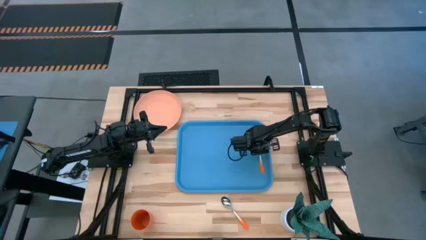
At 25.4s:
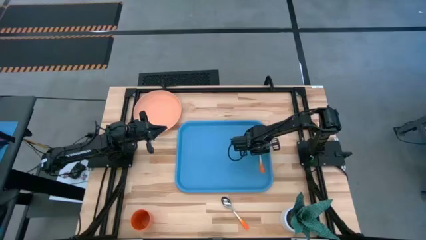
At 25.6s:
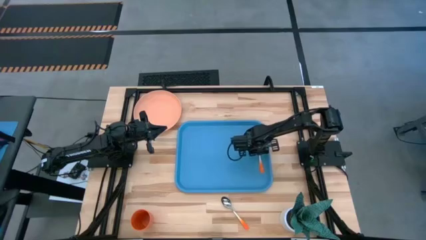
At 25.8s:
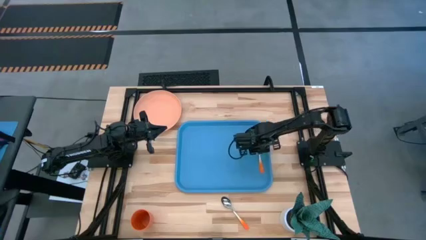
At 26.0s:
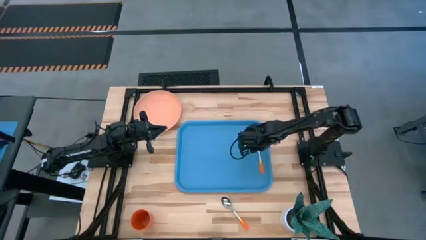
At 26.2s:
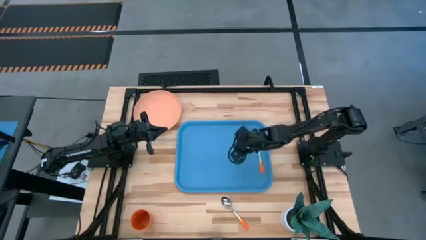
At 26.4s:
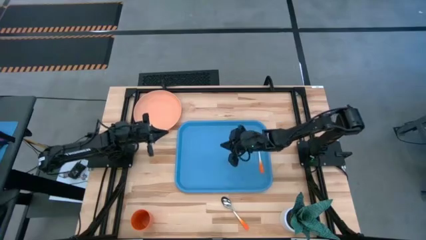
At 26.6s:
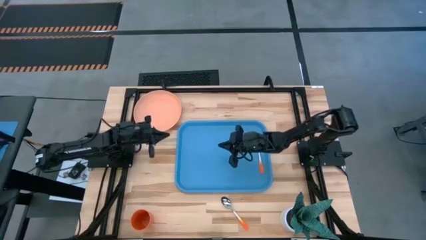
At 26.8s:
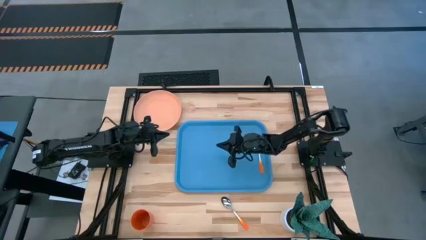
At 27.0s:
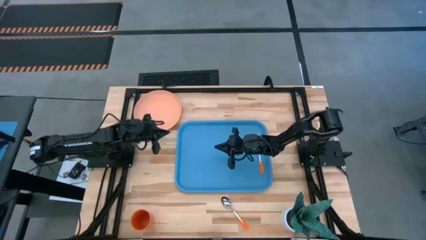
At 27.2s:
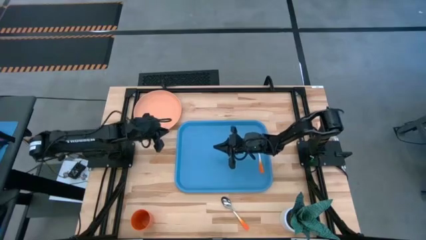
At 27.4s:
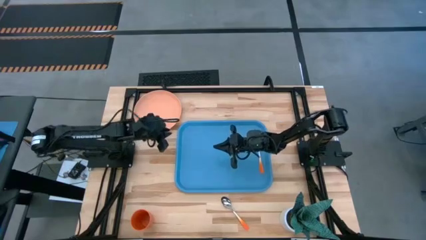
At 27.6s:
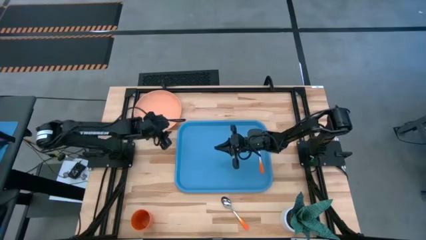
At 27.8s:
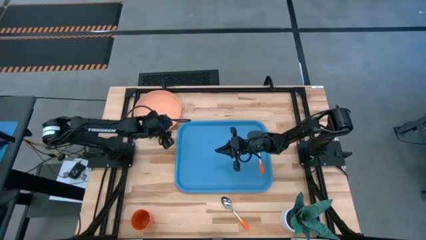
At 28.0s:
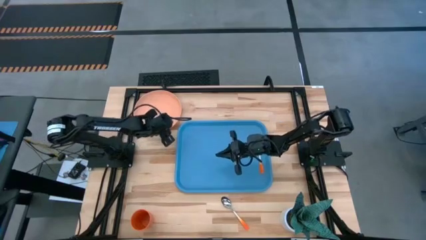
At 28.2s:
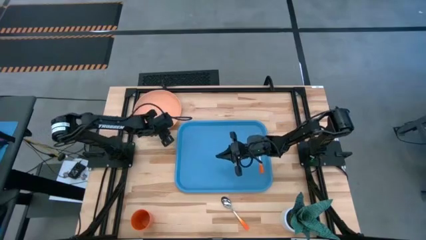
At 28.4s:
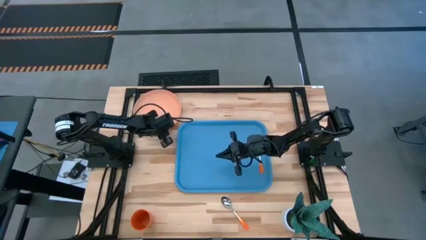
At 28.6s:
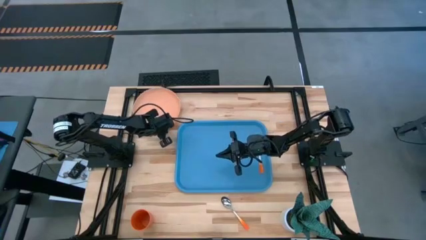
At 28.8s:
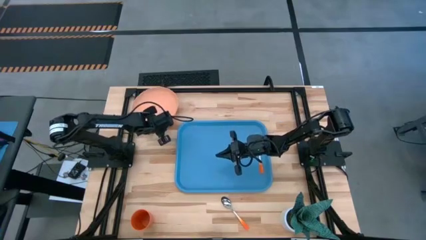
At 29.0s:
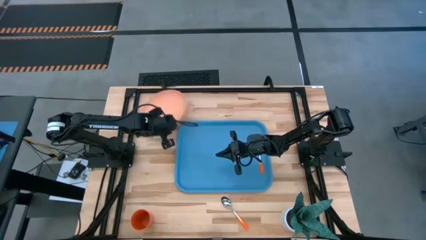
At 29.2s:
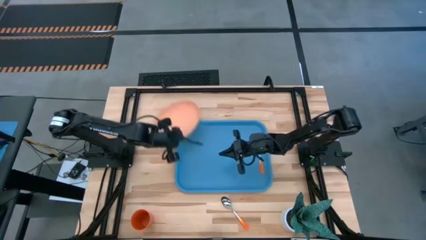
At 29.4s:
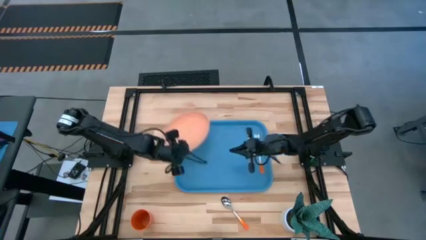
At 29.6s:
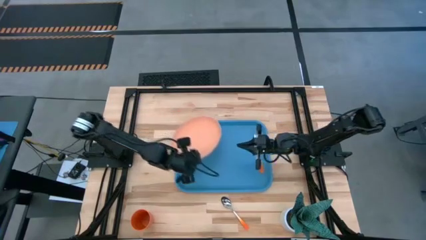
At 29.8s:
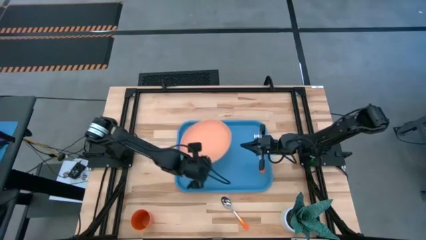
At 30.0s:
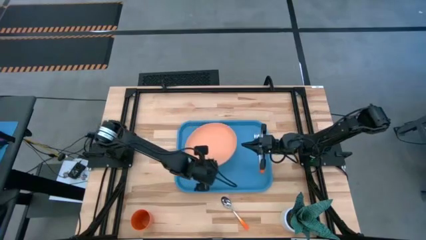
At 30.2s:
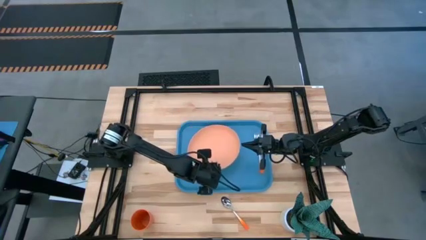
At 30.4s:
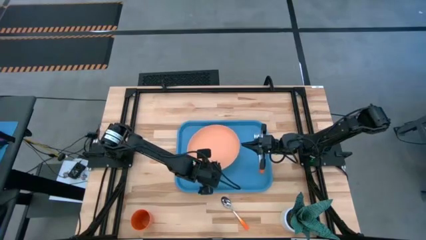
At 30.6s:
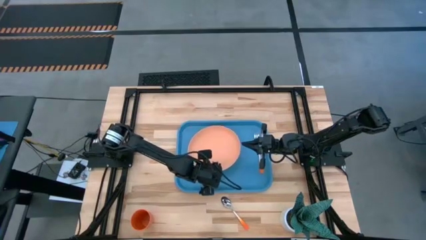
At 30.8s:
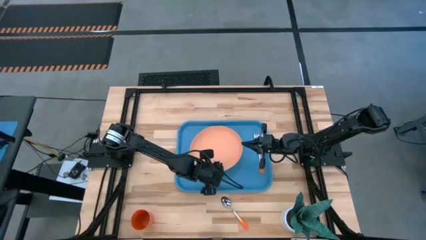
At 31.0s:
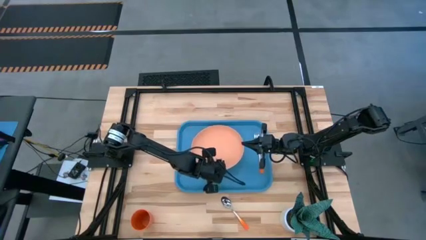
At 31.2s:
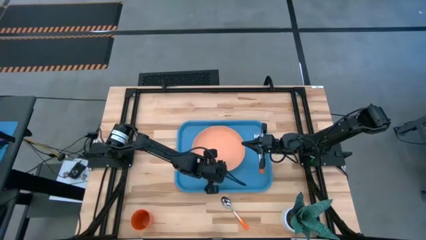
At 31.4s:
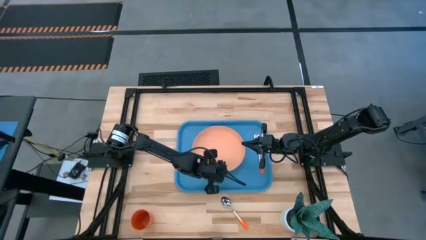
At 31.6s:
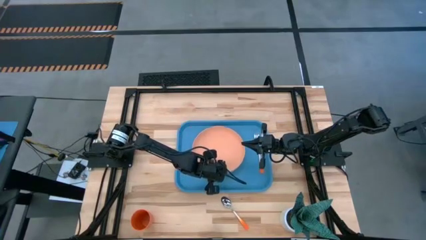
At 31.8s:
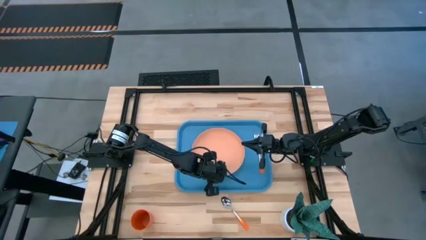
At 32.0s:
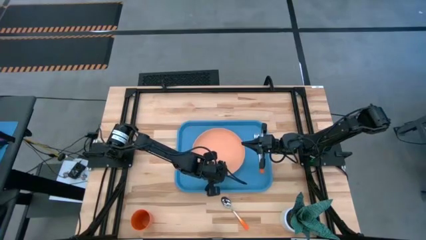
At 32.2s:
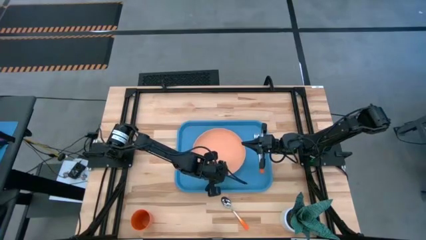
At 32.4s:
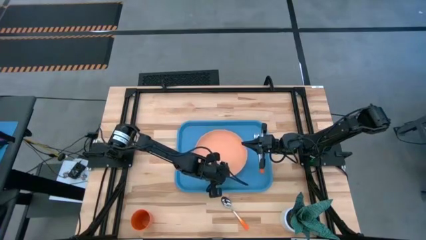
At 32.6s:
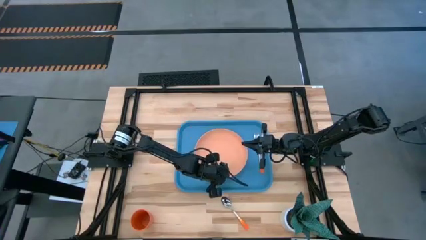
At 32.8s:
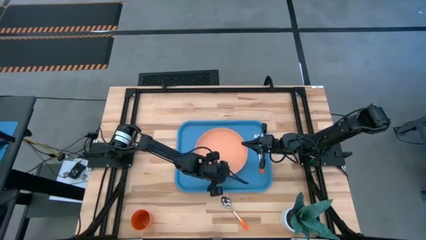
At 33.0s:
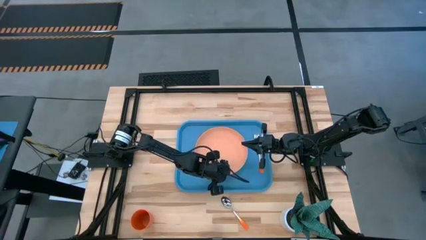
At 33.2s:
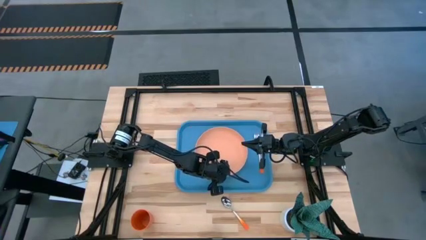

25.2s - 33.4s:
Task: Pick and place plate/cup/fork/spoon on tray
Put the light orange plate on the blue serving tray to the left of the orange fork

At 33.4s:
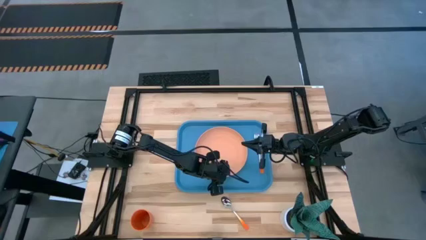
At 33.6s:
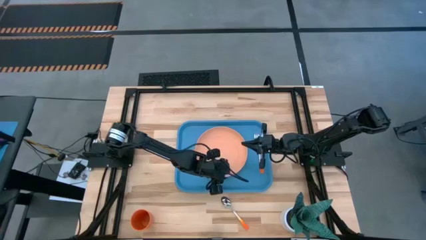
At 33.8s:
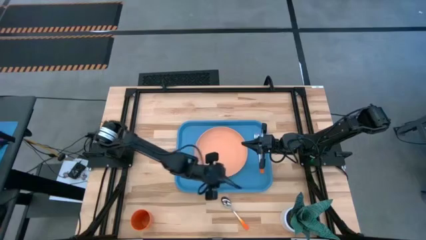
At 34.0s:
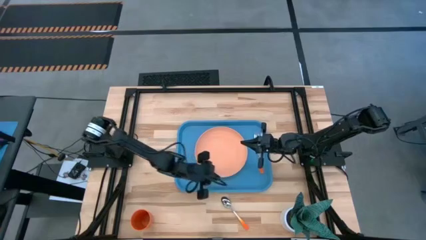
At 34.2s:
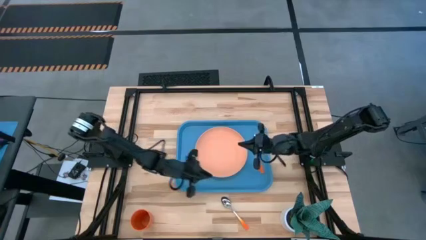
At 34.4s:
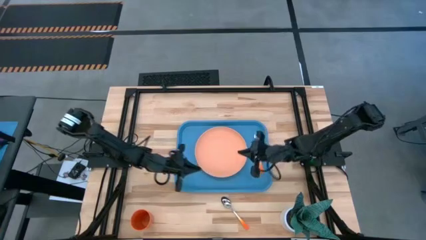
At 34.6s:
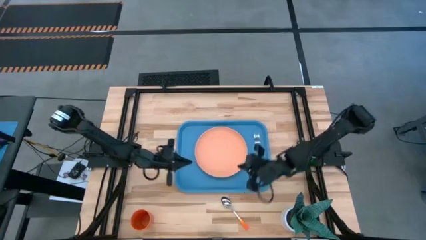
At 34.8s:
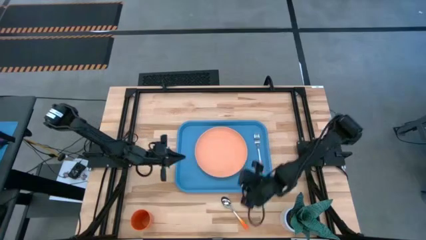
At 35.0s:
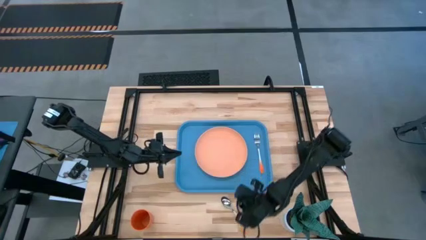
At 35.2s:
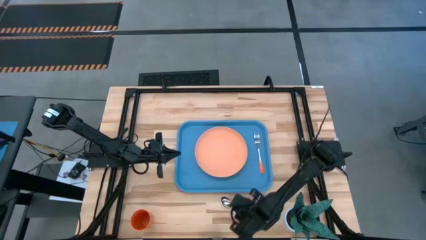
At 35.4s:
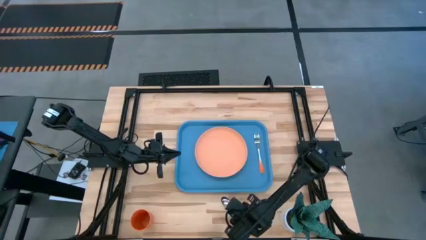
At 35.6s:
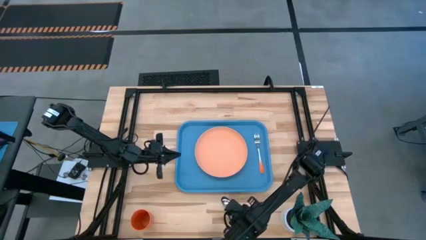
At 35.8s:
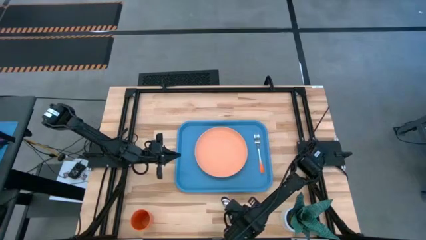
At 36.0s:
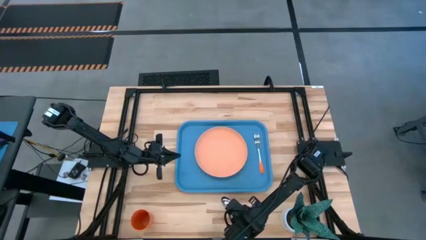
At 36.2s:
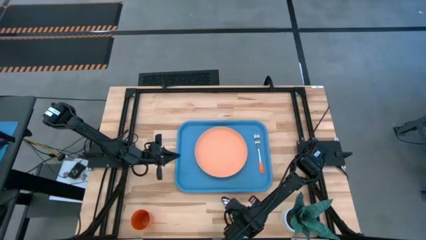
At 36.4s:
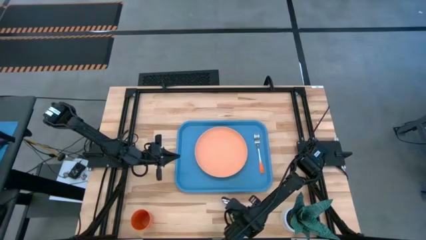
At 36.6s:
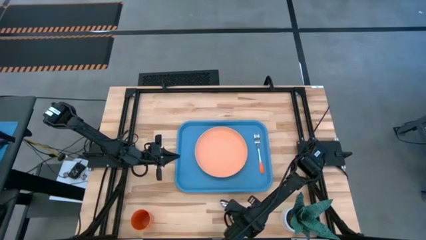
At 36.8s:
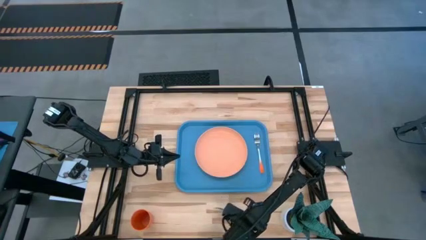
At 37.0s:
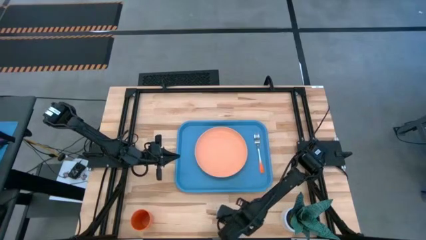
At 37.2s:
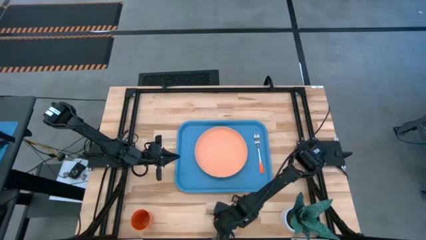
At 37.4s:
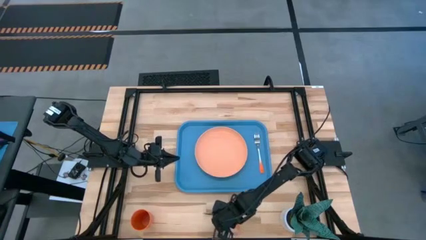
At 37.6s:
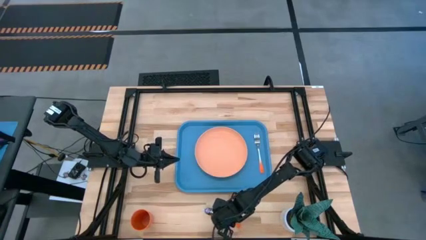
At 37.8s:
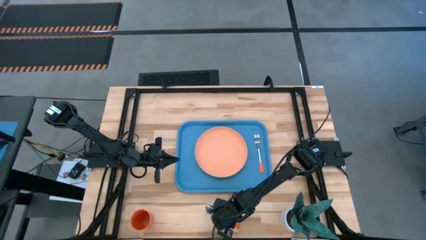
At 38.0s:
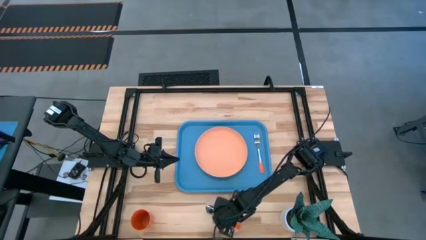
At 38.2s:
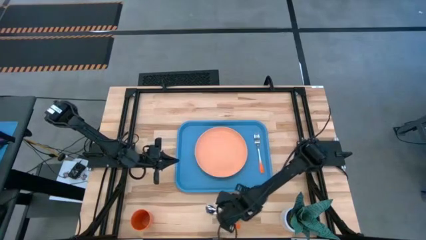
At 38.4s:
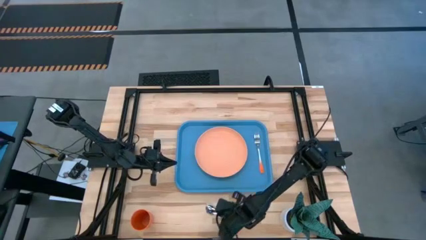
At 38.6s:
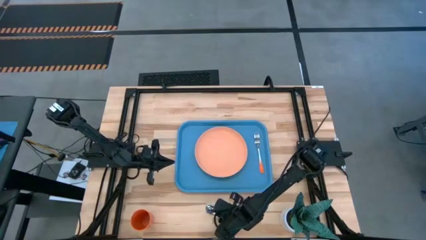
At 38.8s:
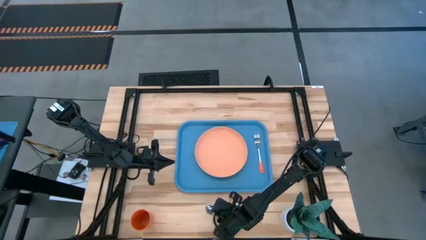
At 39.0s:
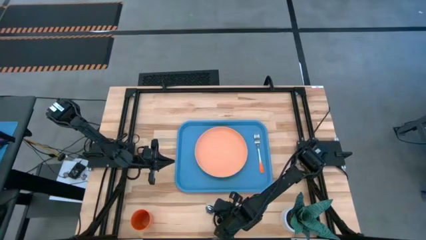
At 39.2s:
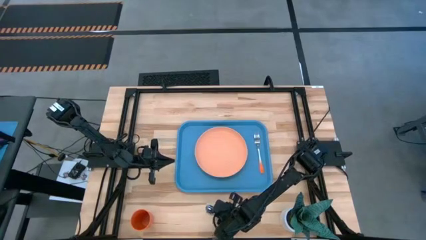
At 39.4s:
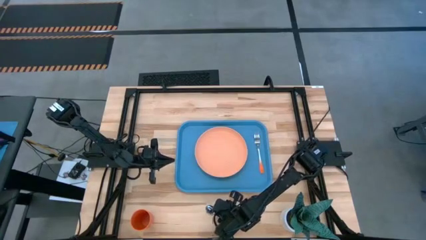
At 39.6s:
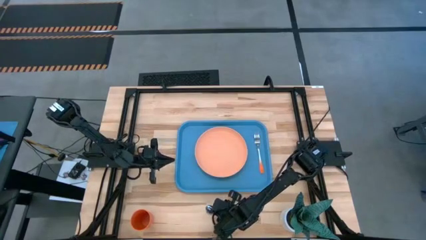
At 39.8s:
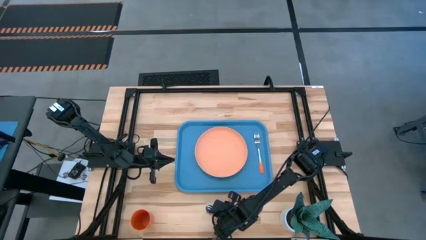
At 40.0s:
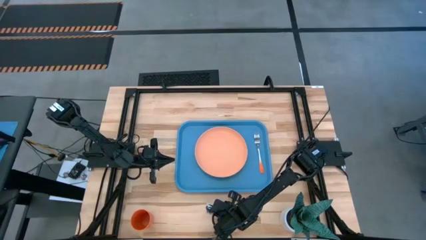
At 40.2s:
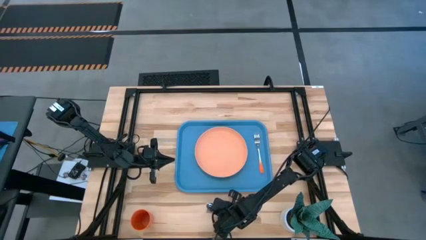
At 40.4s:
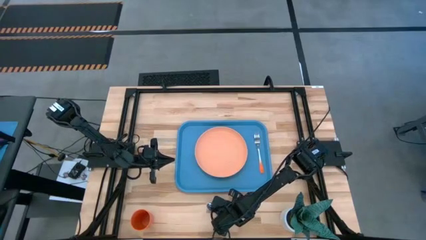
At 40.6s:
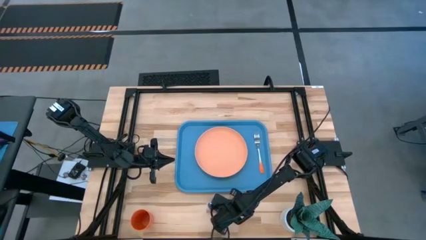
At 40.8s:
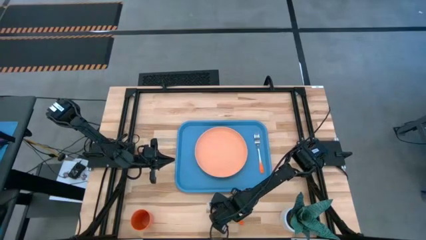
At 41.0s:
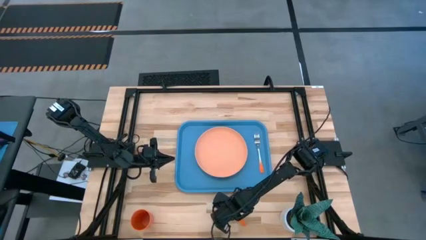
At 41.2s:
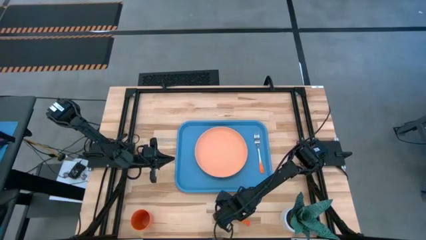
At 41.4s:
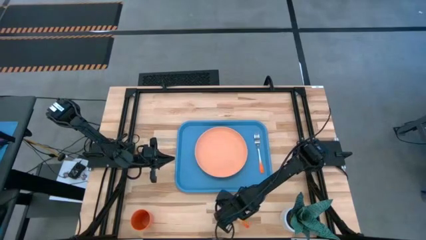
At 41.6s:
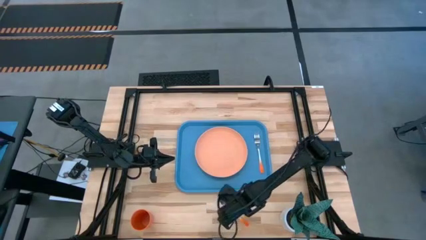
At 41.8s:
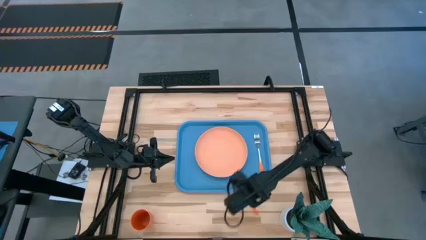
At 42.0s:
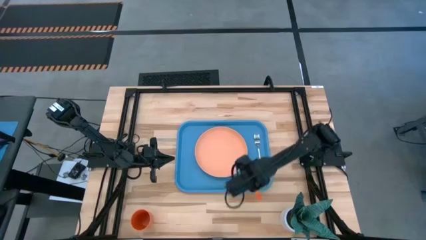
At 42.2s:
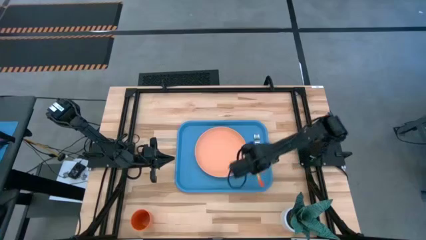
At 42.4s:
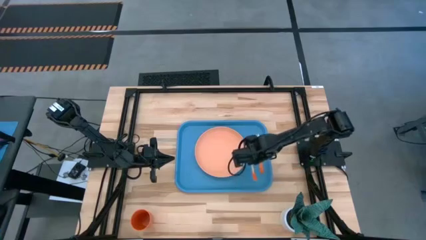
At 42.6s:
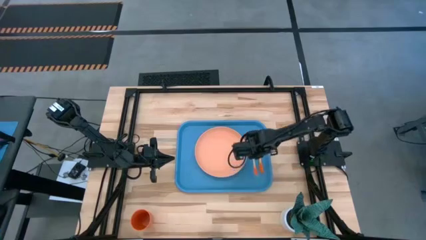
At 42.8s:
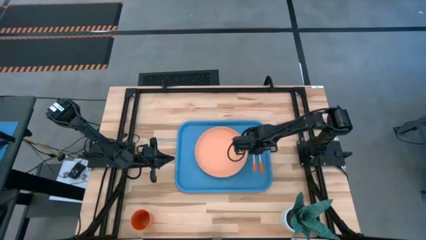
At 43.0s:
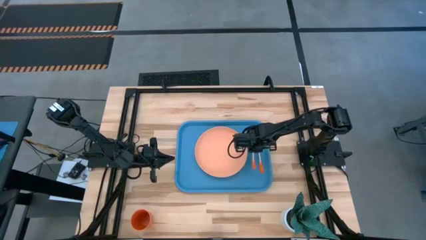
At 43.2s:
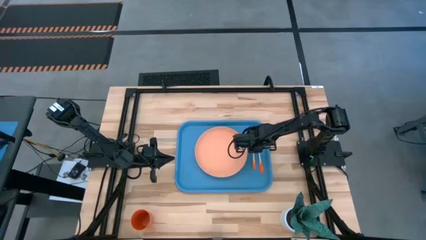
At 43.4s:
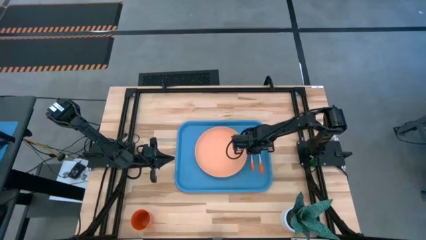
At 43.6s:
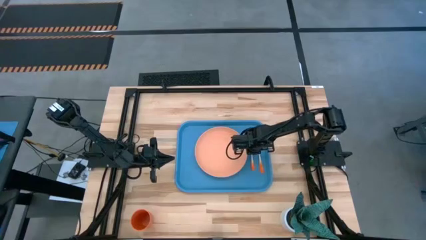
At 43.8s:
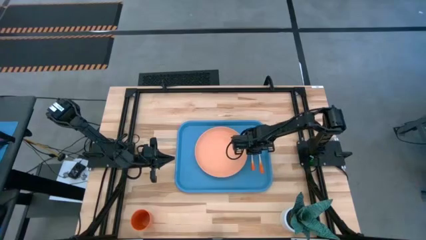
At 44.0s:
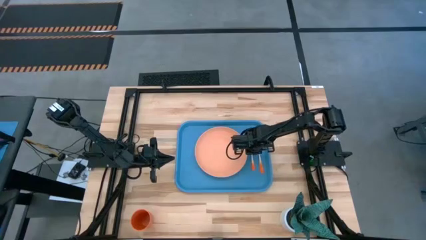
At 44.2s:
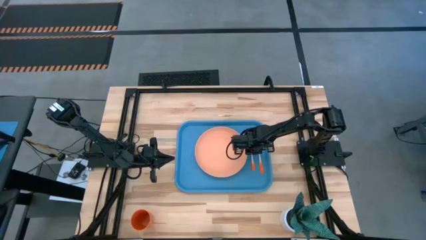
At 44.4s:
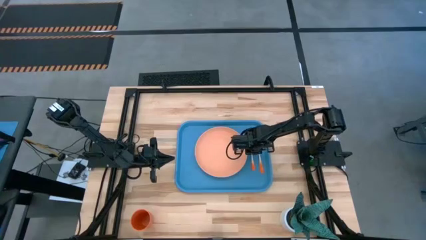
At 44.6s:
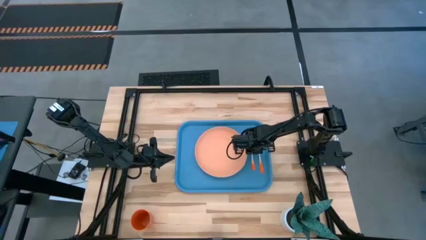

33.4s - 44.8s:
Put the orange spoon on the blue serving tray to the right of the light orange plate
